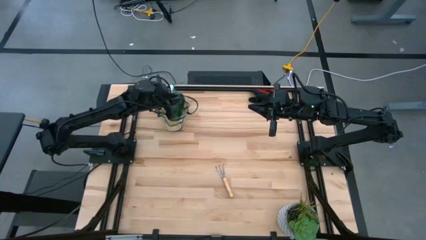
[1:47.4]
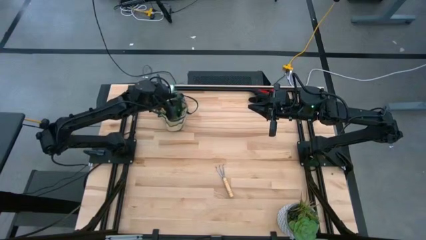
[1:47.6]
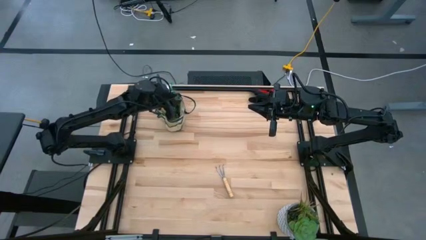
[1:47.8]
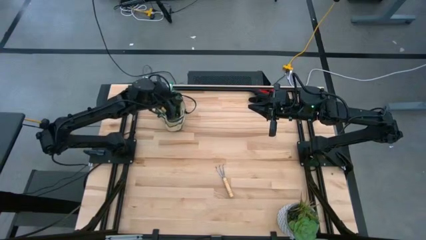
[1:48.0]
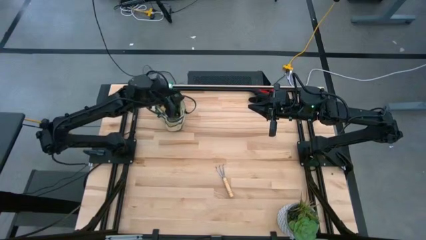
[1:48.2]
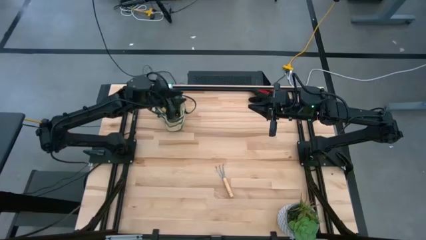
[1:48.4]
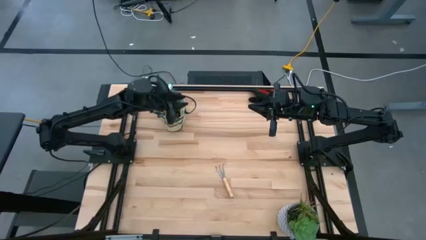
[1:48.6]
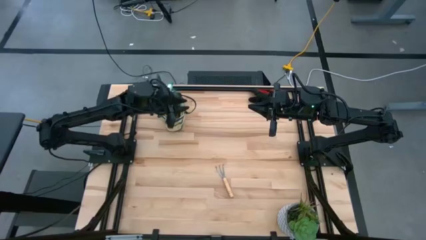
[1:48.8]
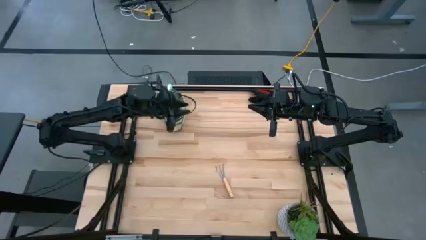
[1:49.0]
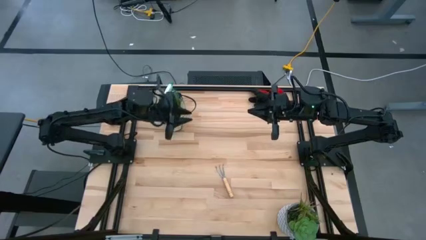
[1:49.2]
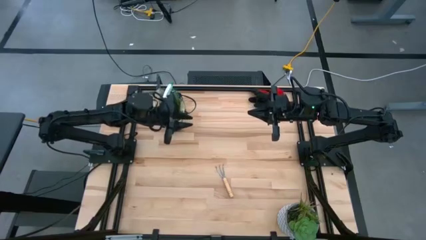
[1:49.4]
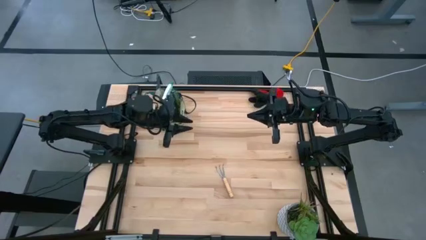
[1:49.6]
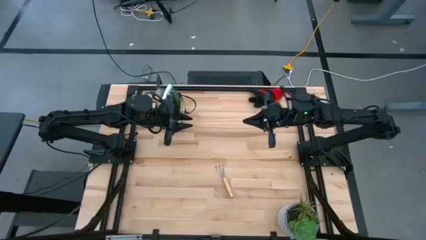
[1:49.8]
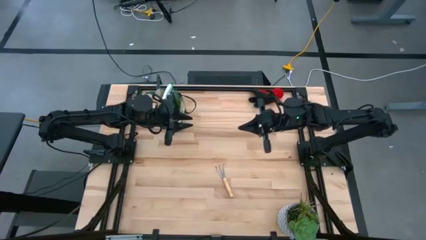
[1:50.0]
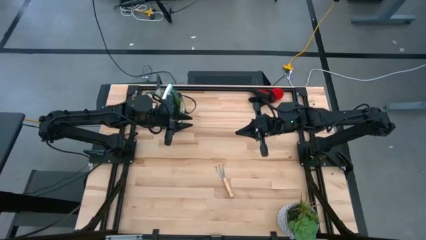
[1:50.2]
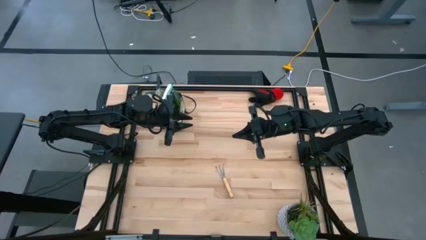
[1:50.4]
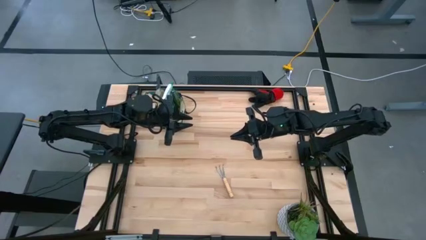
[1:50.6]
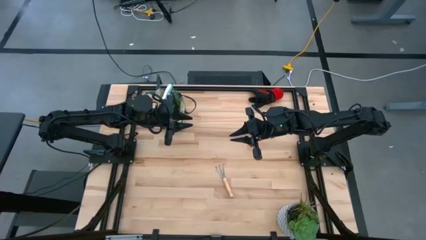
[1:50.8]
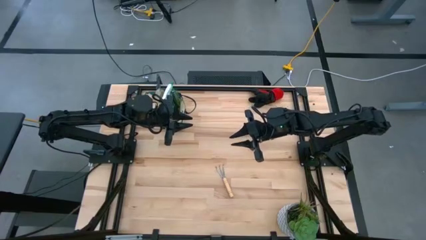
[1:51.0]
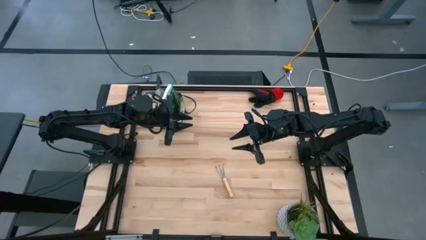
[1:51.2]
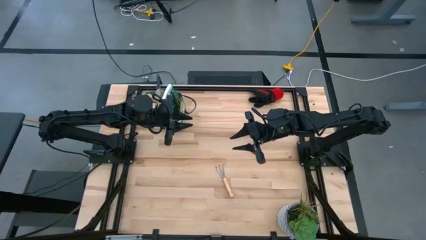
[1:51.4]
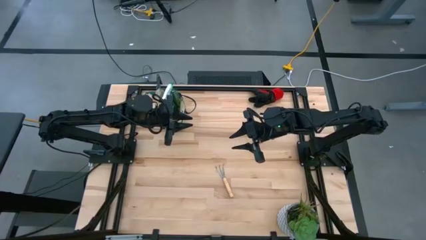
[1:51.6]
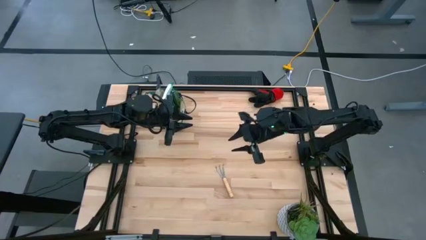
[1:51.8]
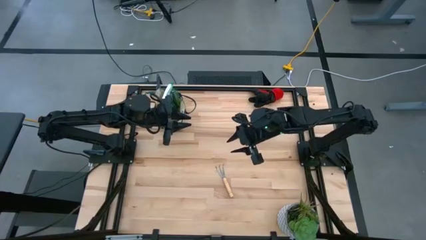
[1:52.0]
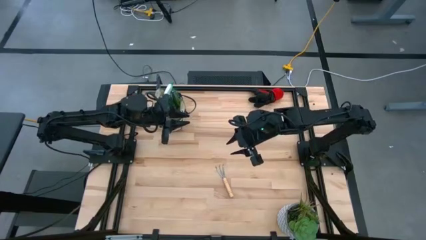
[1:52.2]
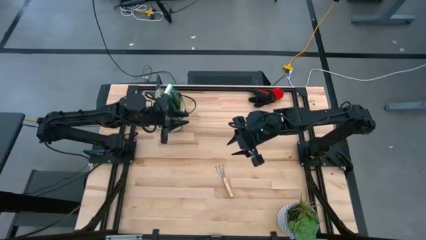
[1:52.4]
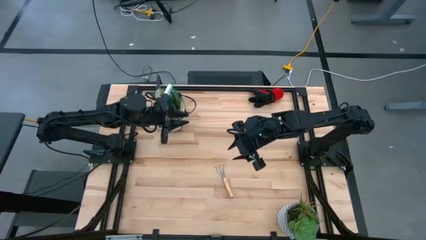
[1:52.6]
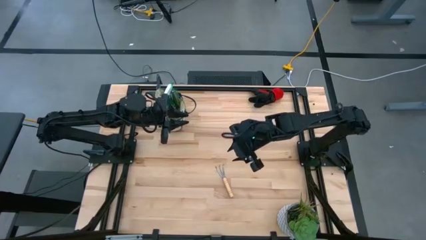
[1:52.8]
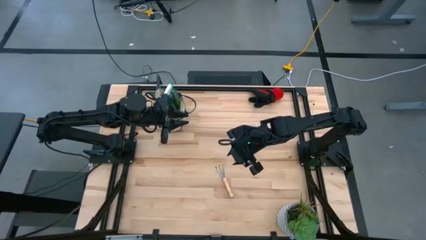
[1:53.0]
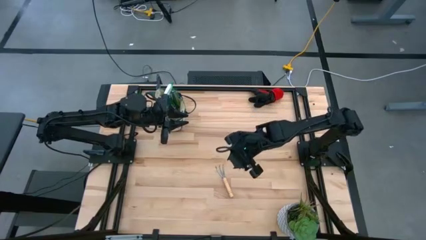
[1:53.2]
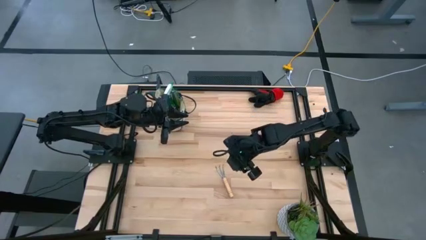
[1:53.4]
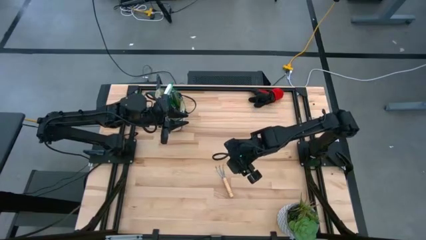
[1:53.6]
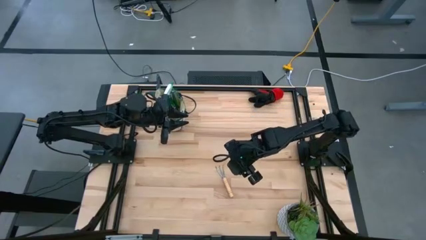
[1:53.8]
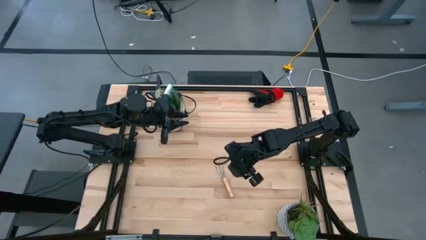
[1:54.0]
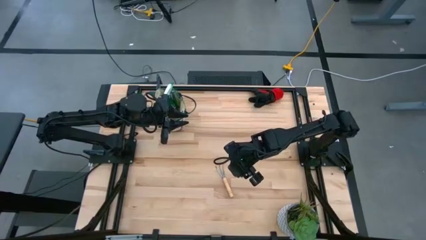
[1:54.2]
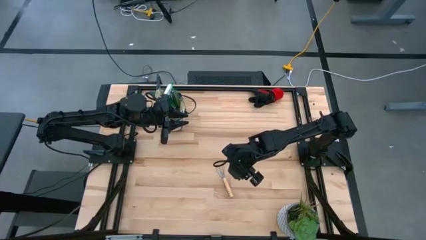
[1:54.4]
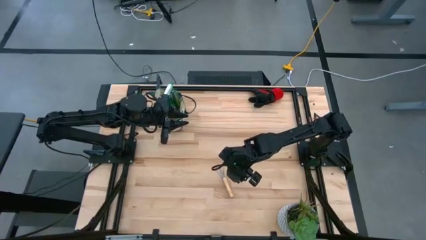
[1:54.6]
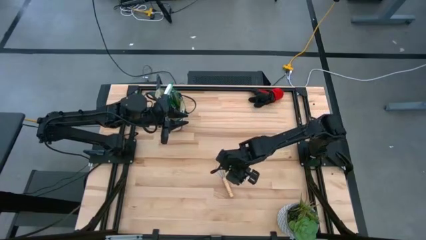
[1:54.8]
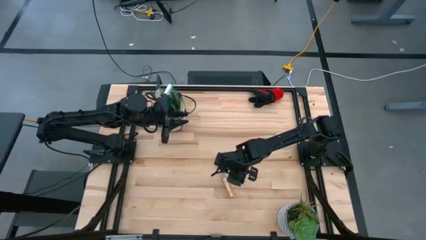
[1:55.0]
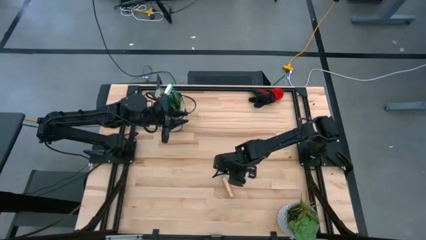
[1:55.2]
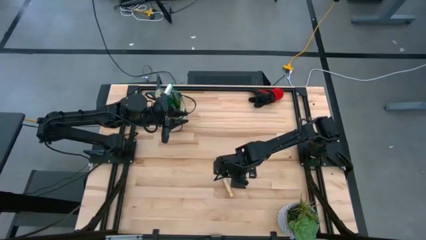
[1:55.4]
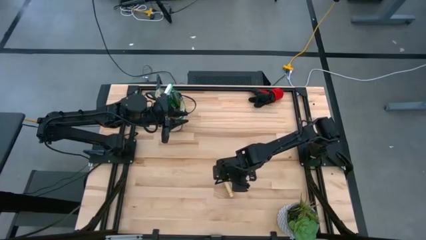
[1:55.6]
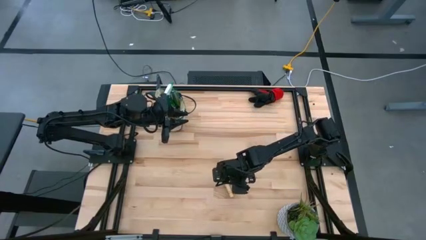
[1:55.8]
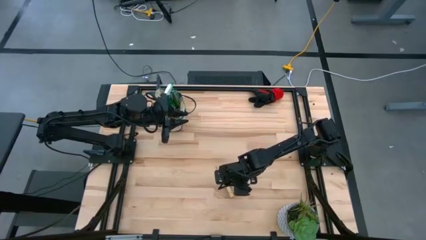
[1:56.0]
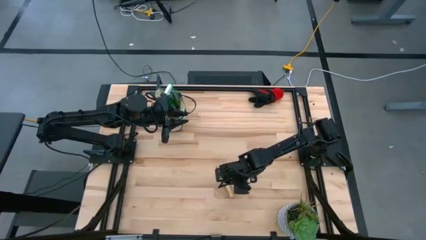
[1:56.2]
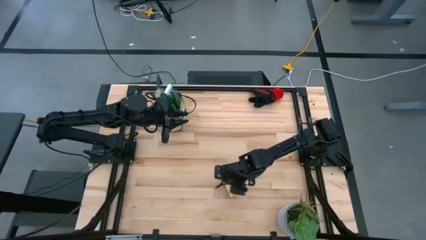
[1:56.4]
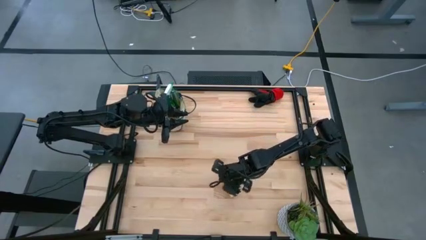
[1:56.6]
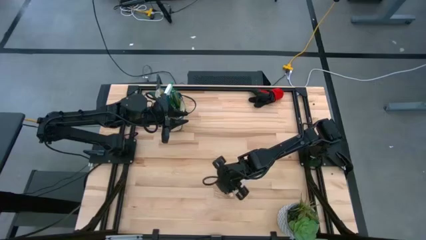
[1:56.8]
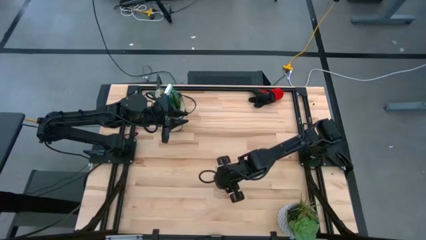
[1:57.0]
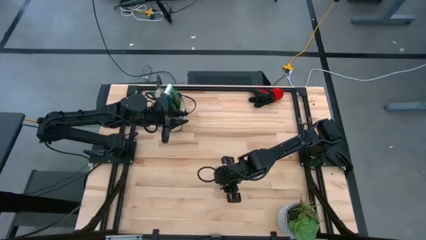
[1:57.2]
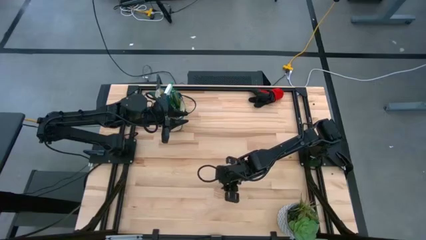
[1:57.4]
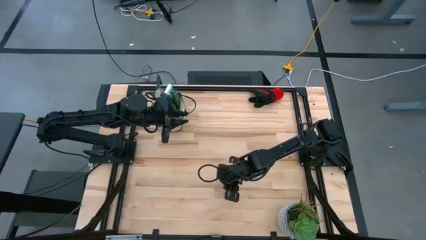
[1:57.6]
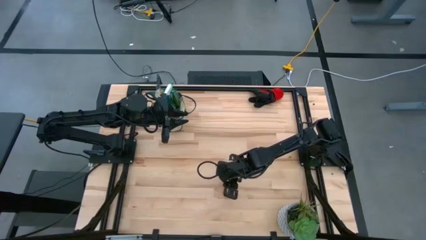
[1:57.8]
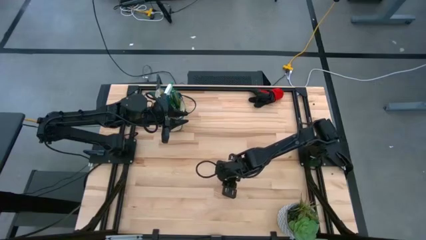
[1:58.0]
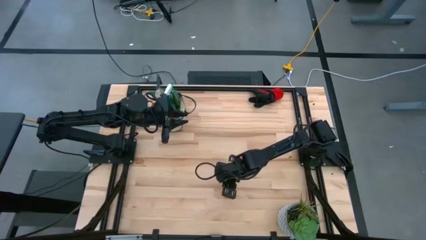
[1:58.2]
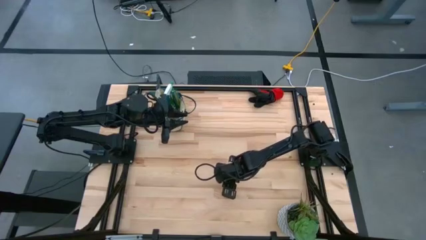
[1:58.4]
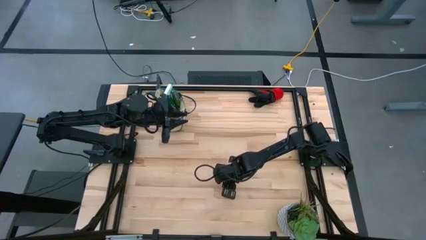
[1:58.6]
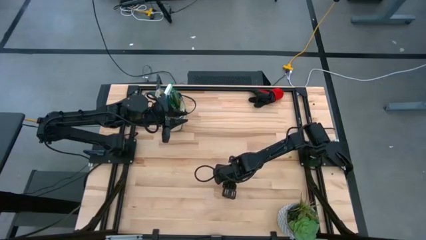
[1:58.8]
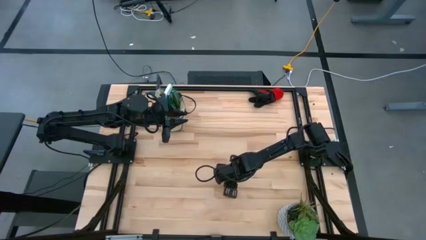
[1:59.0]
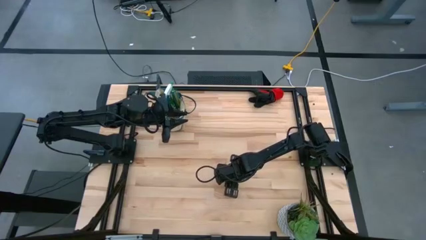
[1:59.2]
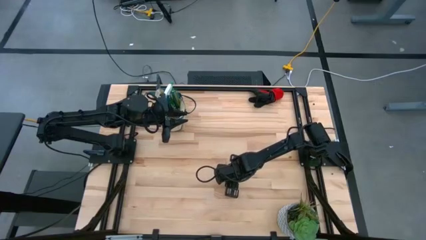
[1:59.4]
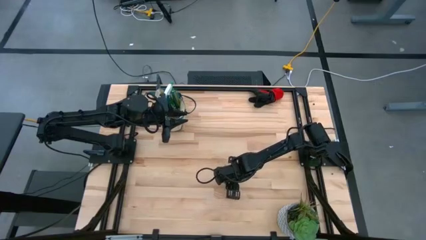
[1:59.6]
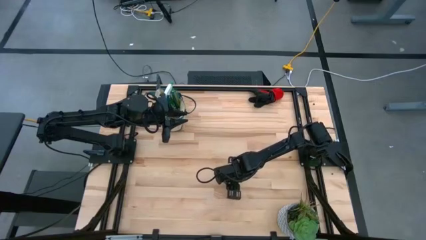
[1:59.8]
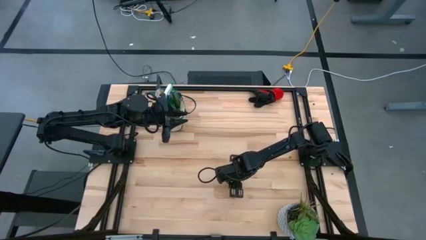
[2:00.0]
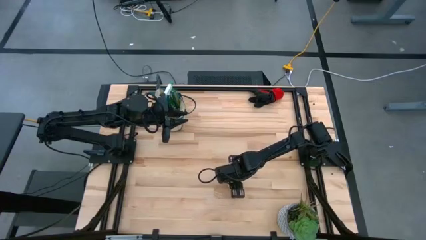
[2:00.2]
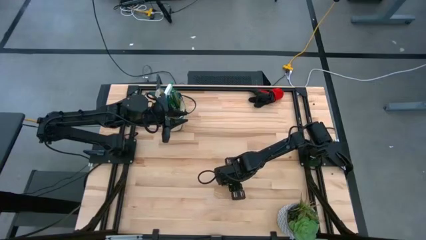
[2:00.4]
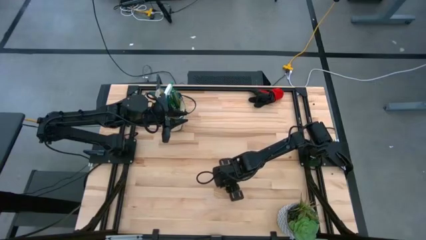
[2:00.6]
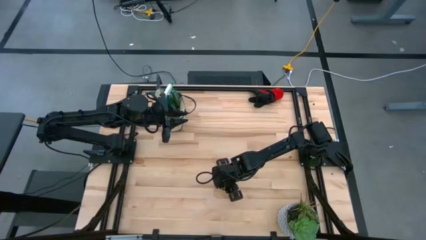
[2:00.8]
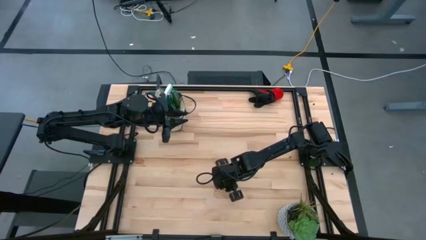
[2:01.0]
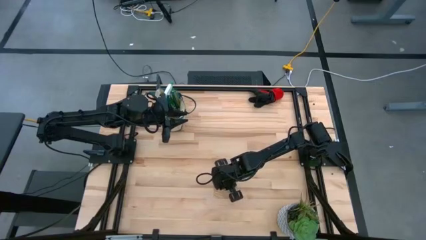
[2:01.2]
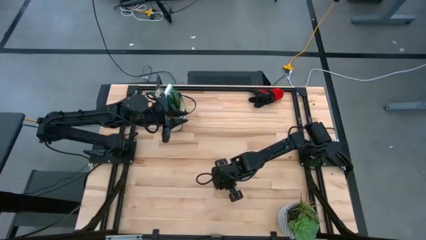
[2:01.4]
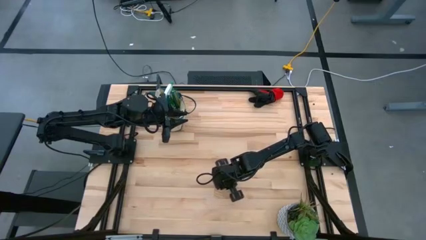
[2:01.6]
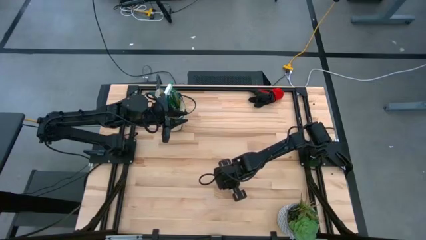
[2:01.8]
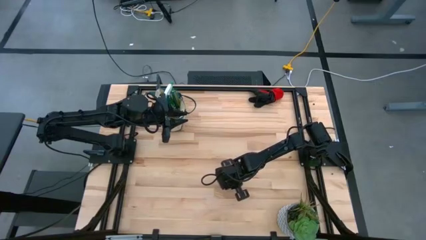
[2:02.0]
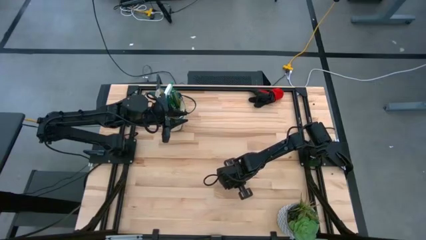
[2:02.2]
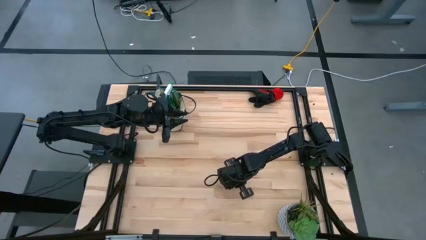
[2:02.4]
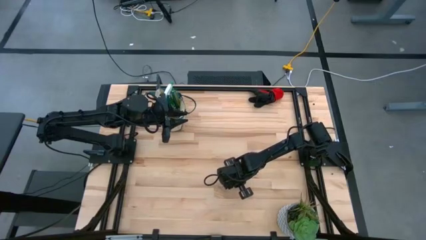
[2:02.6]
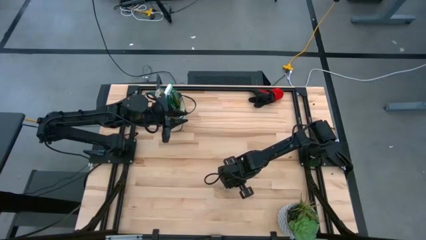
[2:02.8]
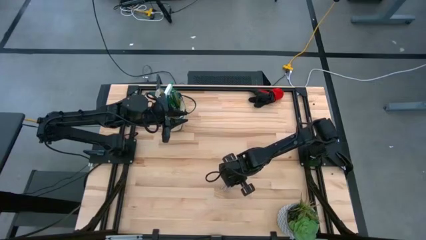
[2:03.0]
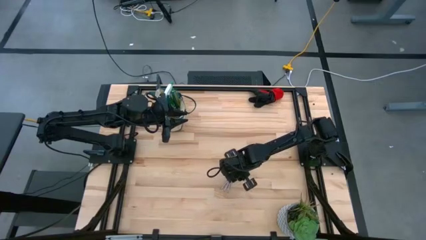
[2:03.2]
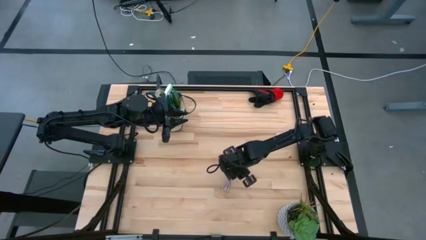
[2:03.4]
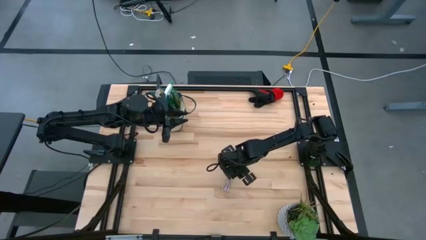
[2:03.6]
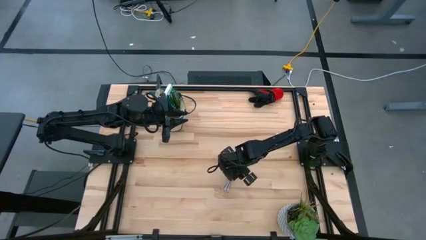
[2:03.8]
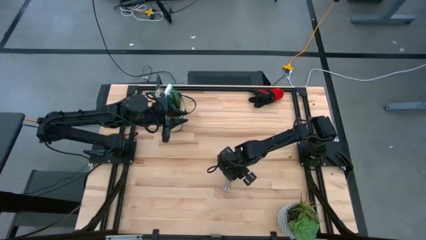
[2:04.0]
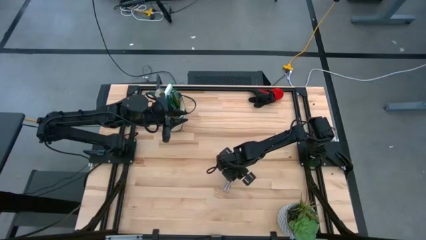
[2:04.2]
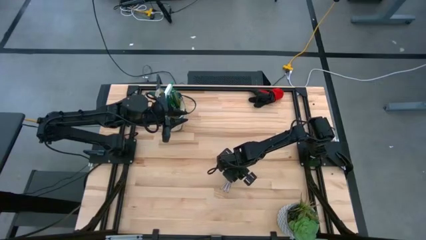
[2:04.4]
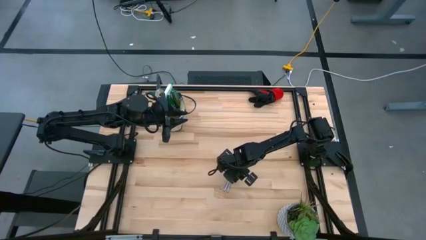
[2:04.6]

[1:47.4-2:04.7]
Task: Pick & Place Garden tools in Gardening bag
Put the brown hand rake into the gardening bag
